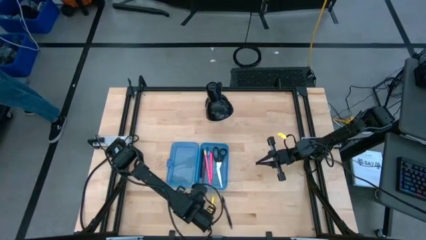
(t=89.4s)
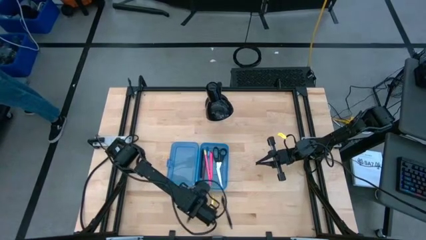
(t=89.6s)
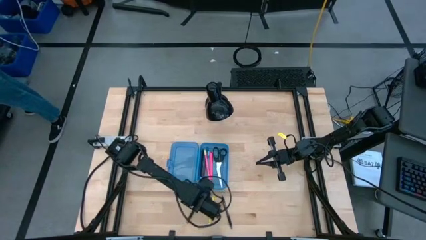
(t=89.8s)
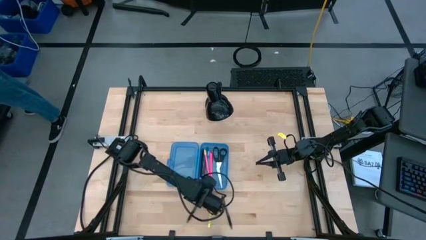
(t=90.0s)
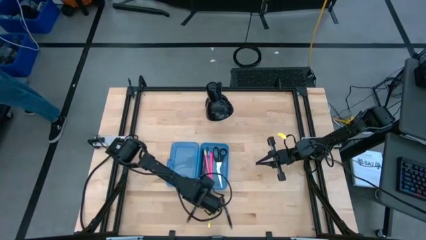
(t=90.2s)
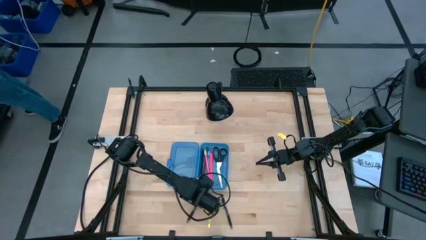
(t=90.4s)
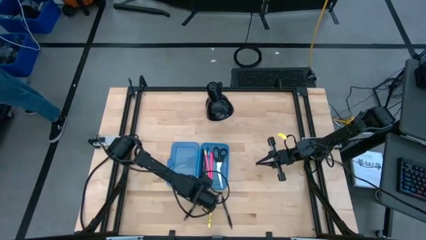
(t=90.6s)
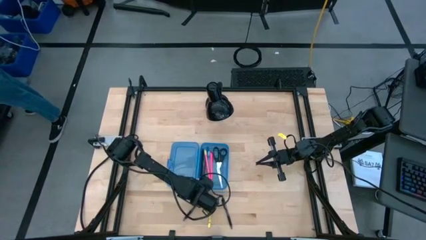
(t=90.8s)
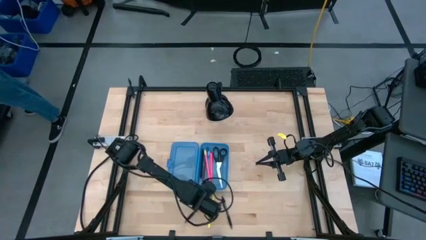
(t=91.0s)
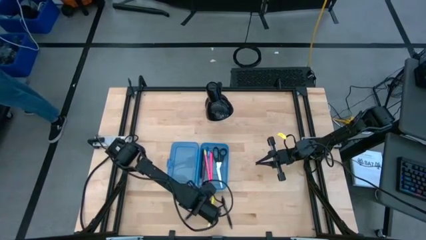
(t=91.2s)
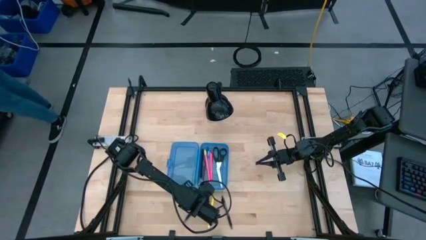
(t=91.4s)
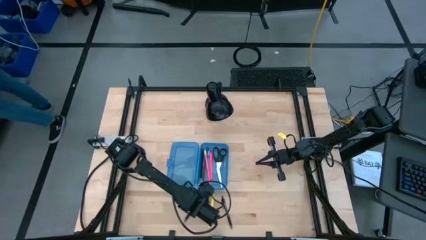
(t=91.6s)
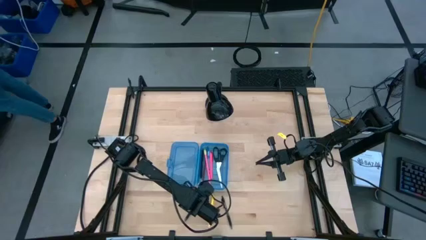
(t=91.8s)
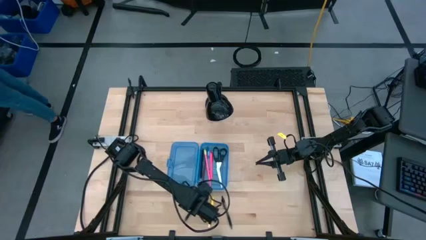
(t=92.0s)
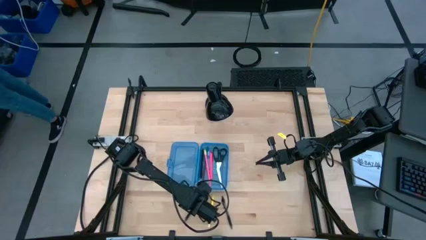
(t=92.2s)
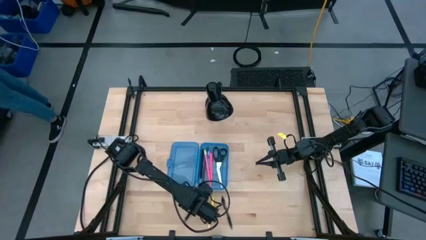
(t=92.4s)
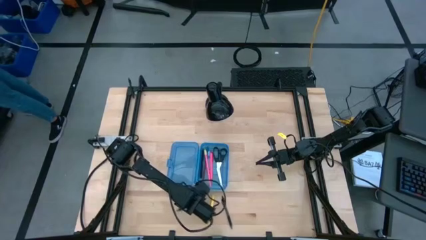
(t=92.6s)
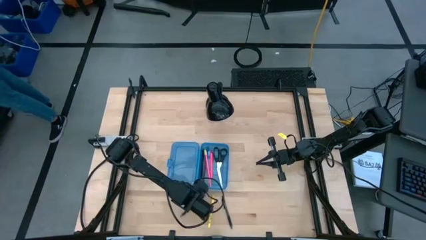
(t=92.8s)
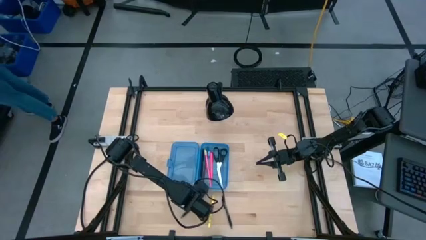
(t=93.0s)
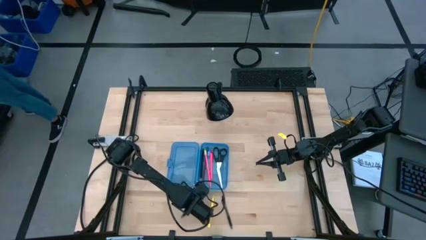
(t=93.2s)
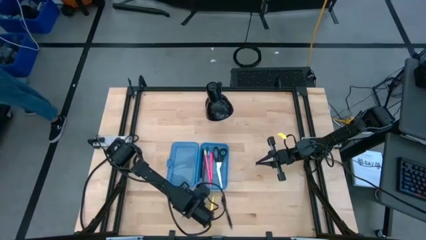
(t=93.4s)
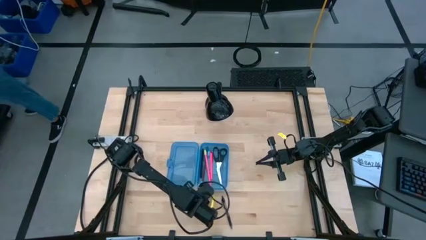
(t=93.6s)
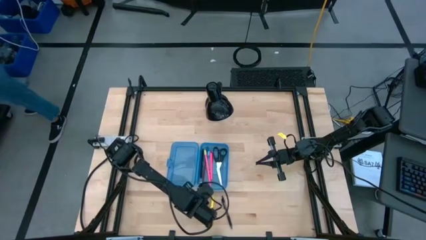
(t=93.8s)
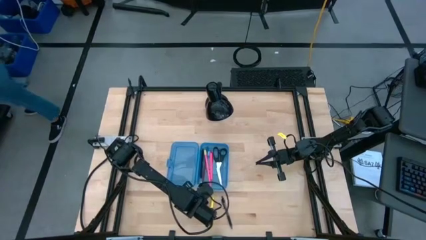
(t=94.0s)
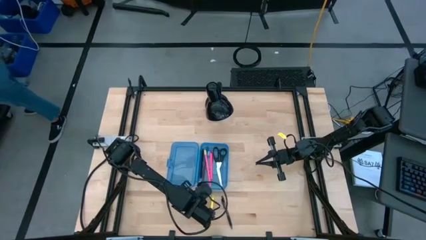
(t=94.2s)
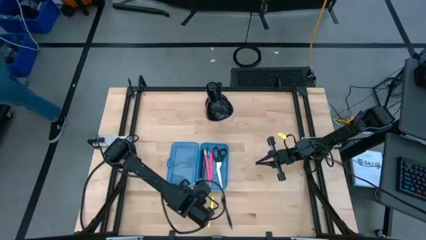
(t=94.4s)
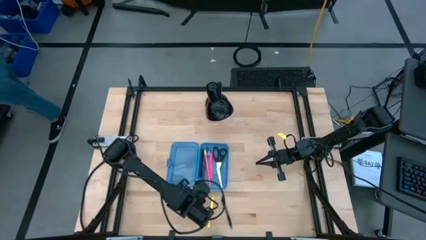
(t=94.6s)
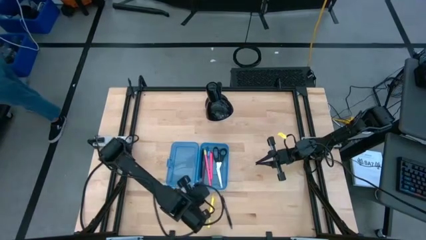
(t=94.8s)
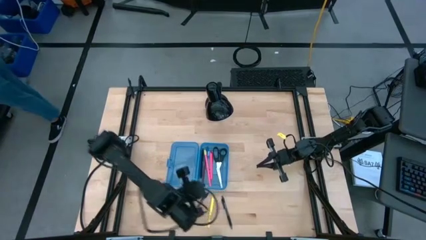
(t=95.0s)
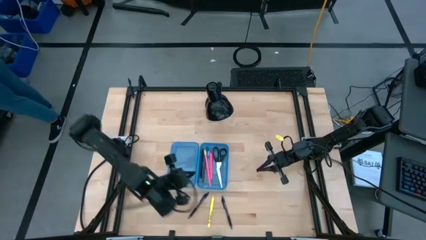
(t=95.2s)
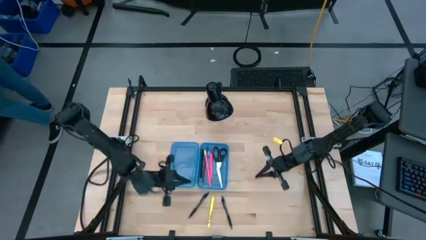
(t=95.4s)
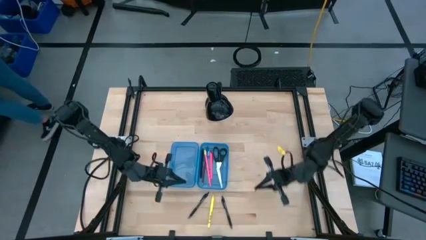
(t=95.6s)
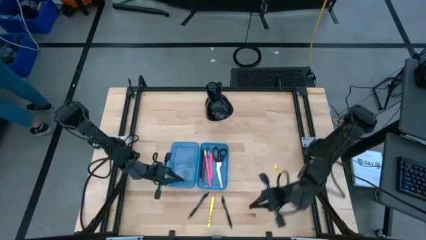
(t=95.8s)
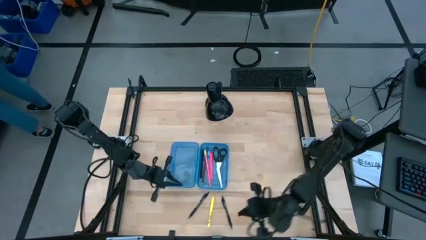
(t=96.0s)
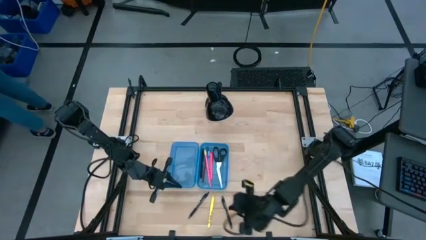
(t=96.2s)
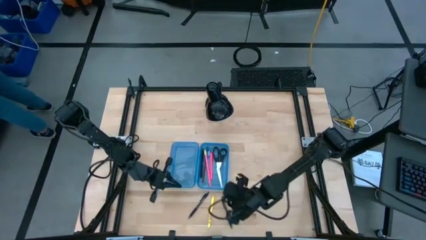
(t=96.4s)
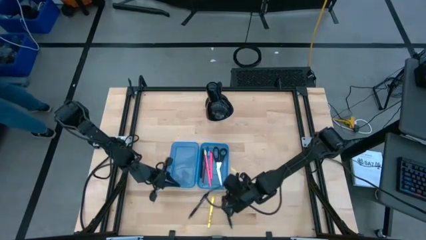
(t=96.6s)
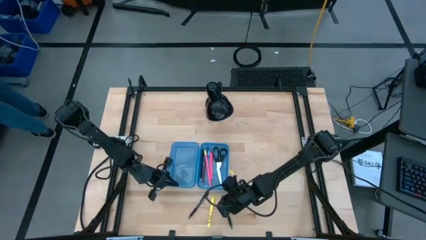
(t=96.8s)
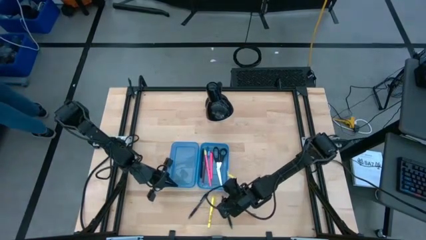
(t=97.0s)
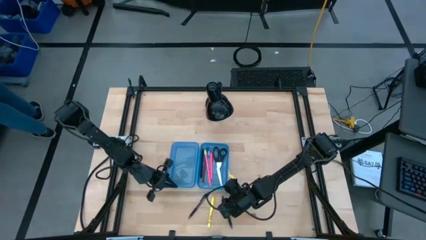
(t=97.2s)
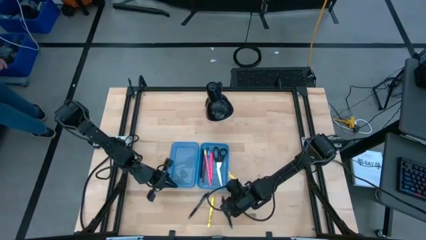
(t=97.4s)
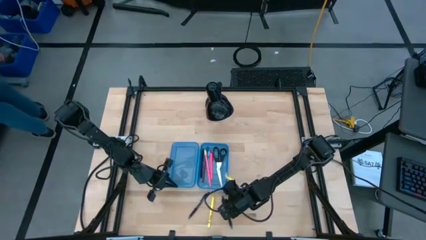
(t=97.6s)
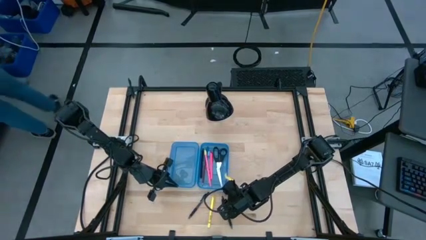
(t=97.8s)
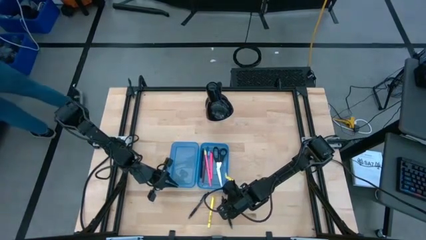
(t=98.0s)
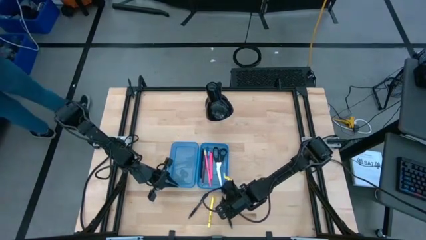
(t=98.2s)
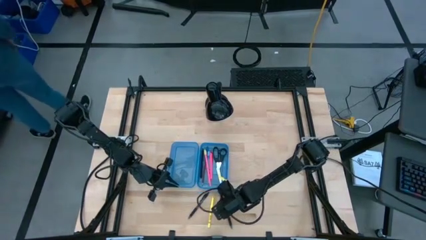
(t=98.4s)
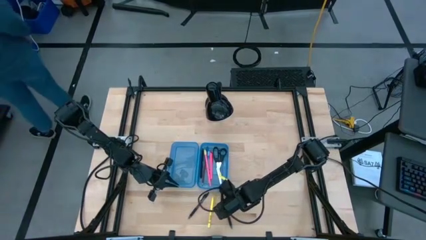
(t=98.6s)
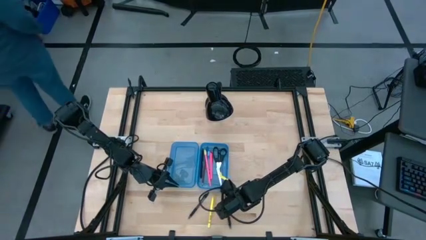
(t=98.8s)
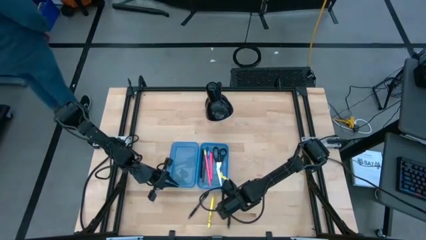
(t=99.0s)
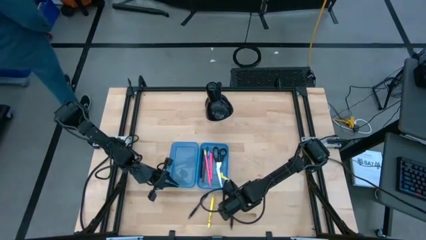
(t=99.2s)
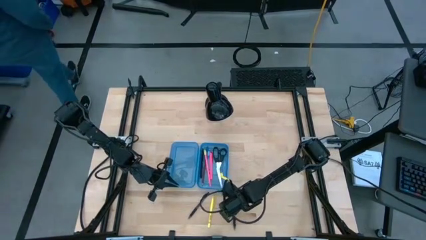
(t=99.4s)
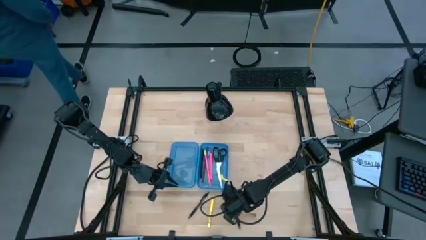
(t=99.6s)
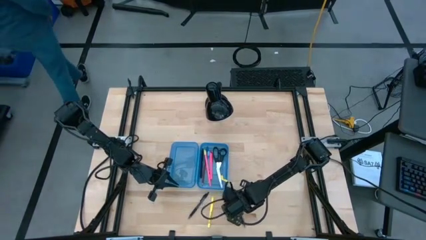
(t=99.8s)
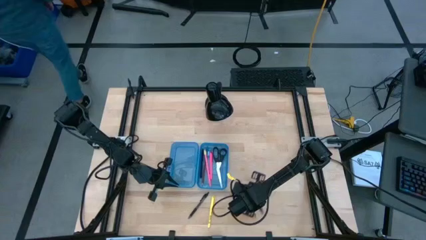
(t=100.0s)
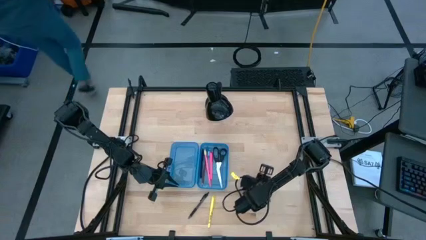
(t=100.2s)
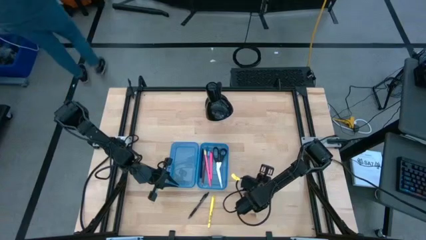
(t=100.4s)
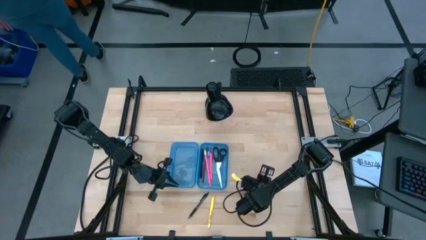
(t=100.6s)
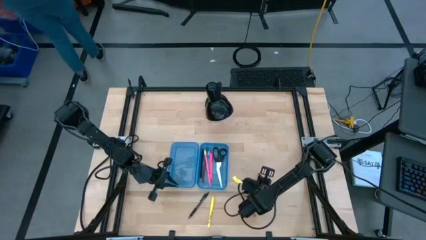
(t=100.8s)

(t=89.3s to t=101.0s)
Task: Pick & place school supplies into a supply box
Put the left black pen into the blue supply box

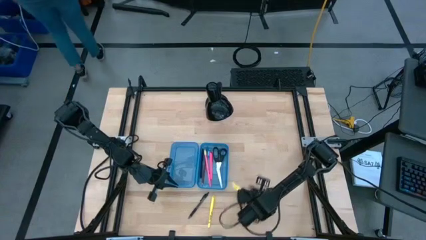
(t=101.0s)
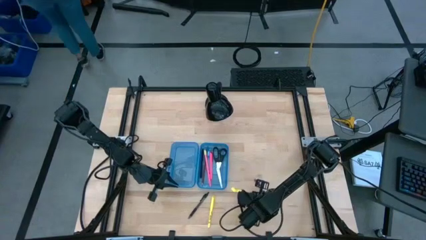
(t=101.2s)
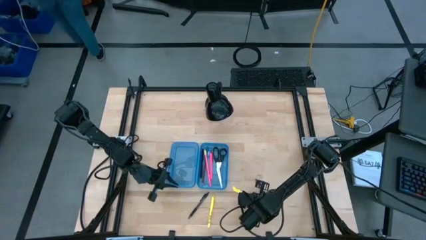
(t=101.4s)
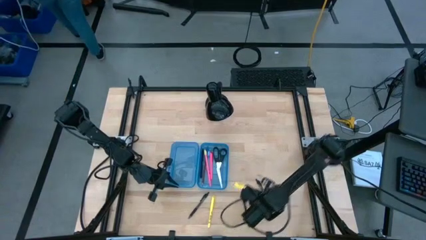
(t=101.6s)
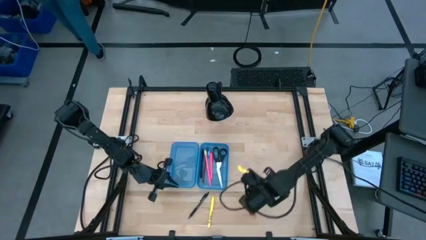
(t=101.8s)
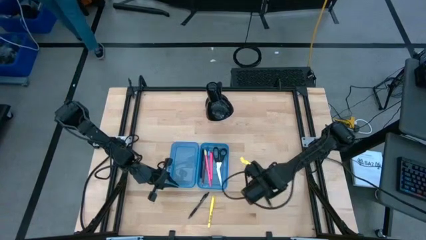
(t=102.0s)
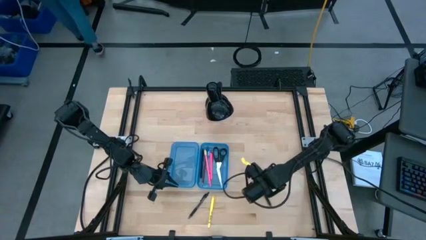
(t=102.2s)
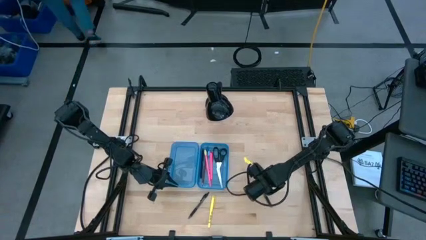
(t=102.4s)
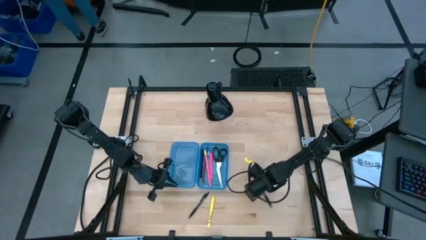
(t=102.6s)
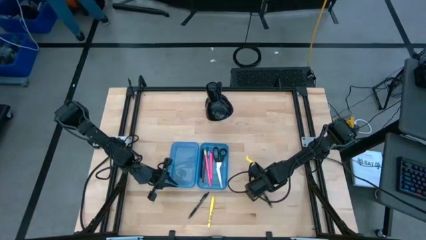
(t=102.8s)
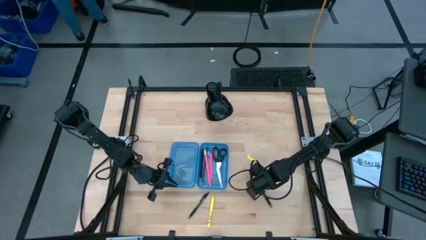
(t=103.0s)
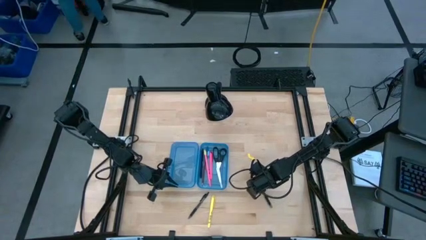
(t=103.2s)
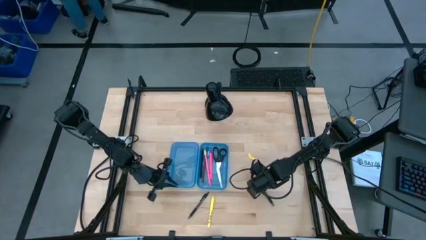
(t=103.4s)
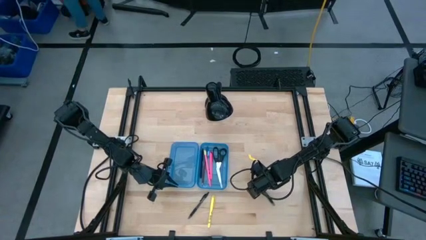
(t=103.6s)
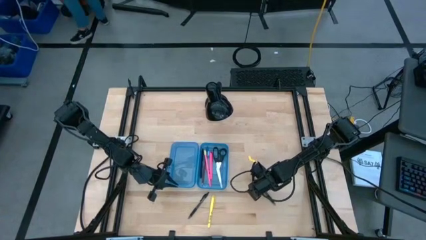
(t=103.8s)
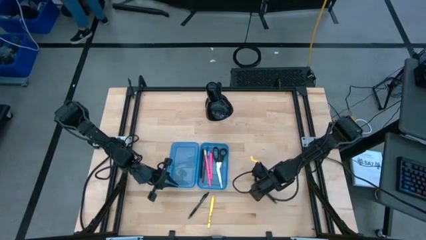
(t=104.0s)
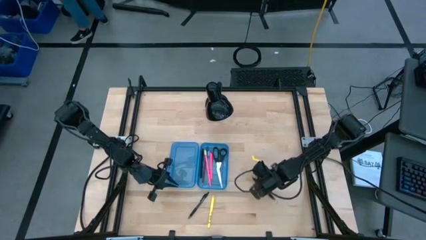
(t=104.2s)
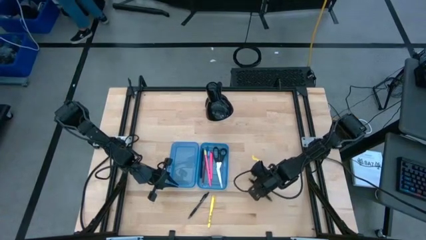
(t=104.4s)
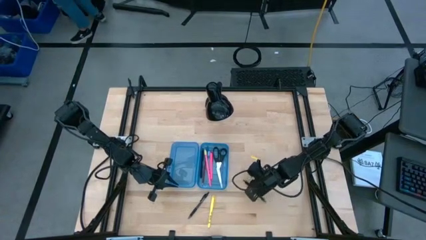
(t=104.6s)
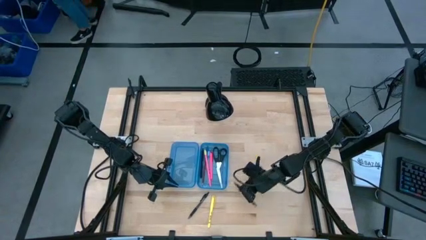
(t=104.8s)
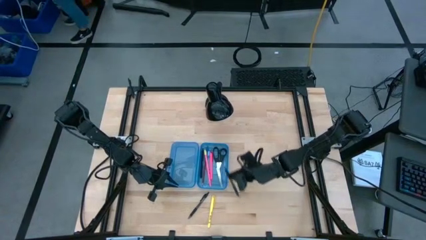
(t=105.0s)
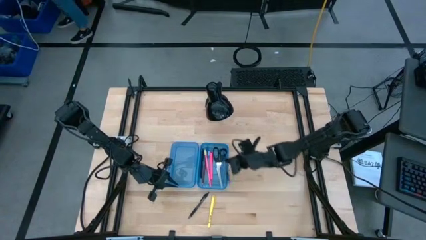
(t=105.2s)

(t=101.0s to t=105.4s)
Put the left black pen into the blue supply box
